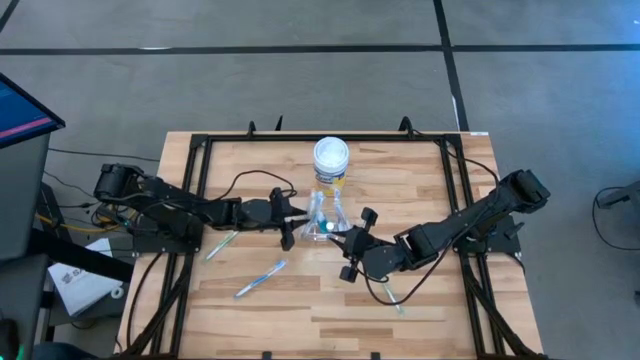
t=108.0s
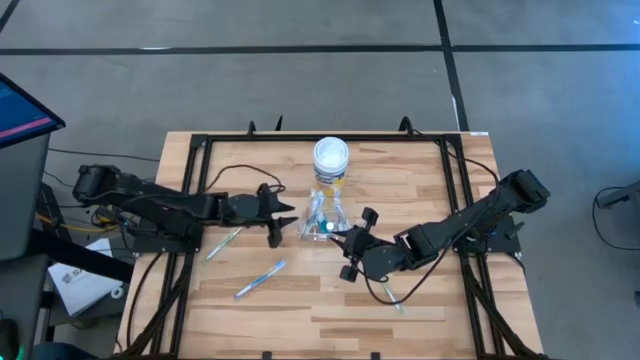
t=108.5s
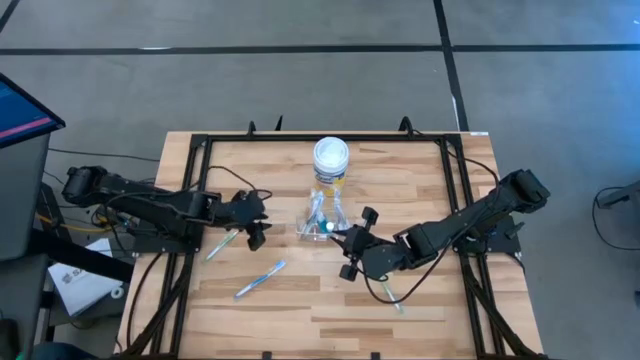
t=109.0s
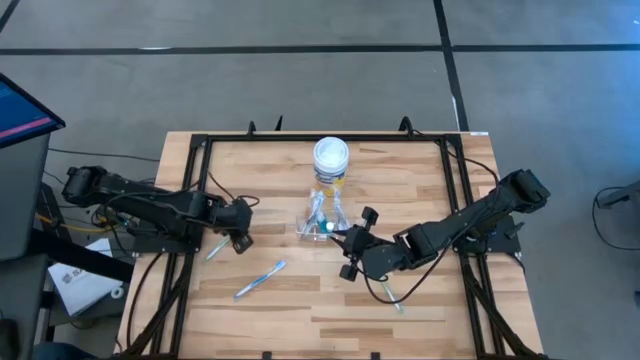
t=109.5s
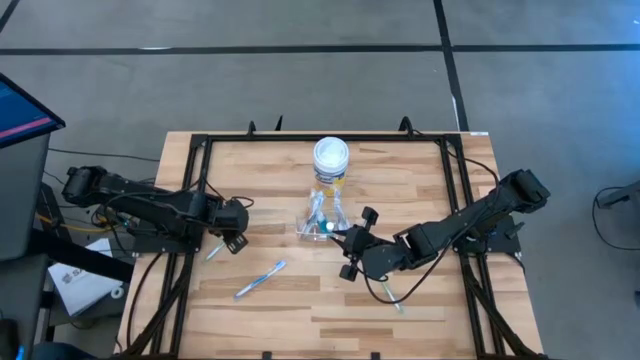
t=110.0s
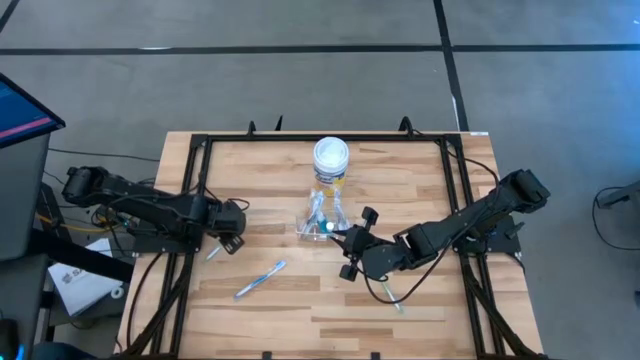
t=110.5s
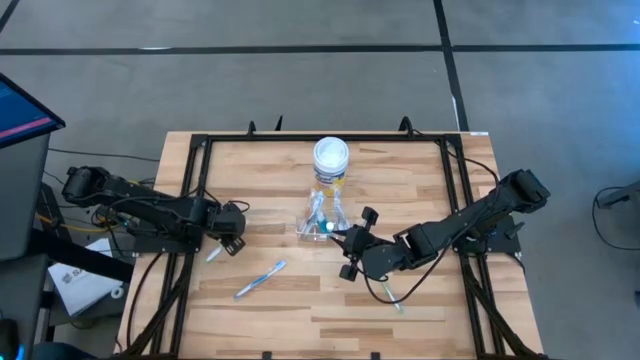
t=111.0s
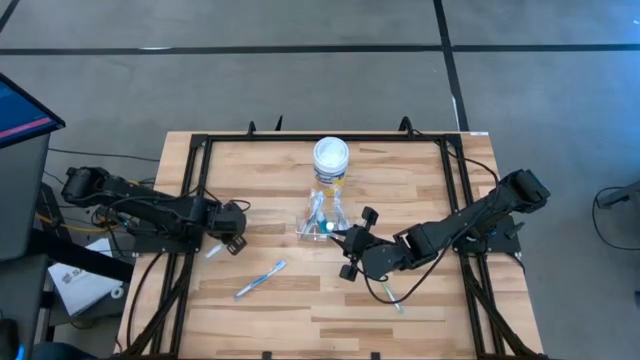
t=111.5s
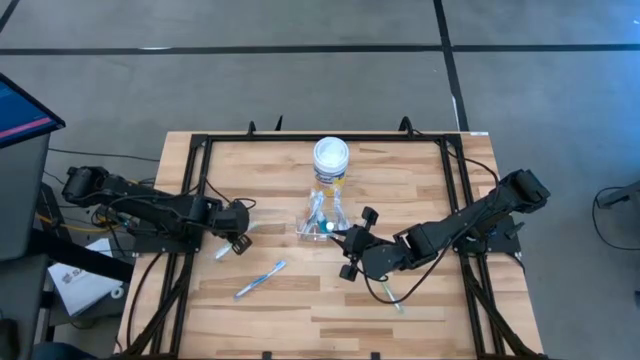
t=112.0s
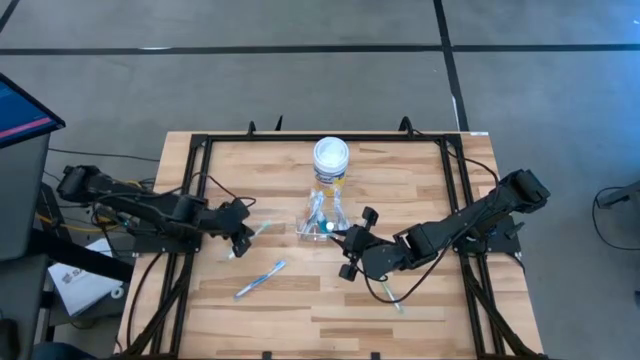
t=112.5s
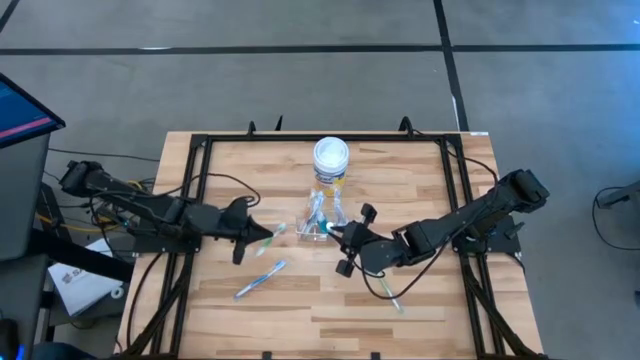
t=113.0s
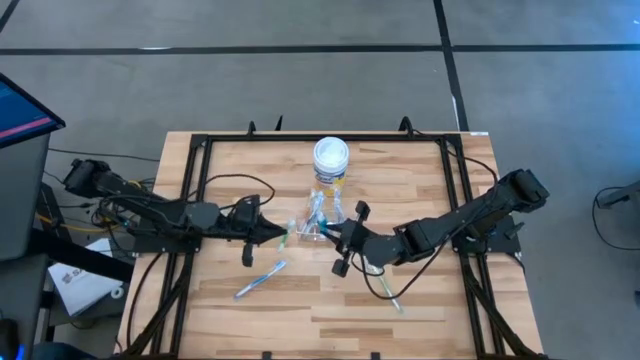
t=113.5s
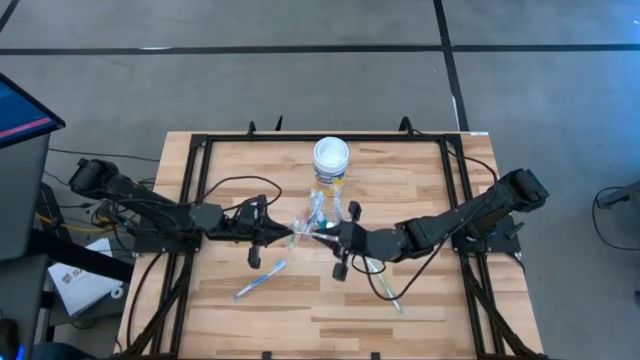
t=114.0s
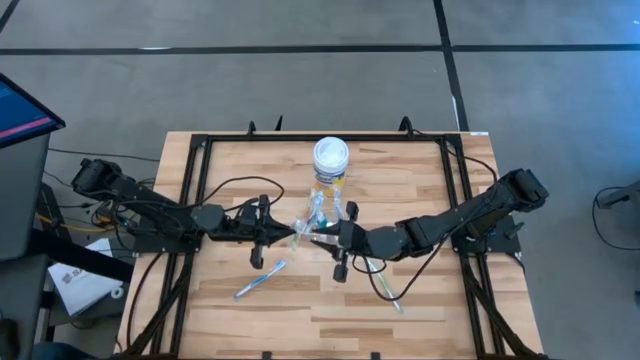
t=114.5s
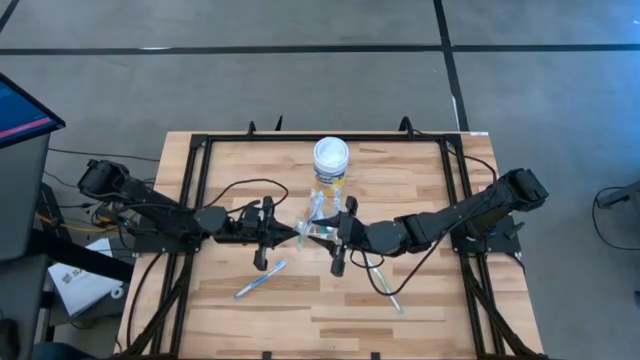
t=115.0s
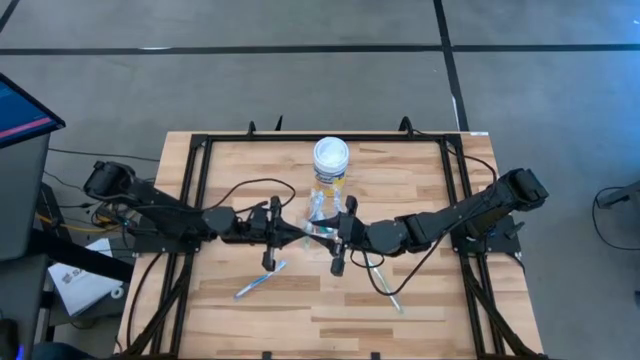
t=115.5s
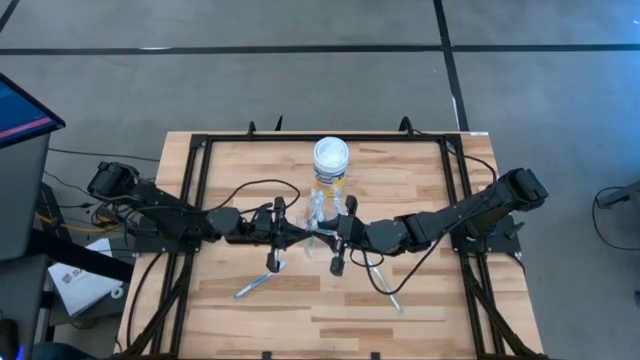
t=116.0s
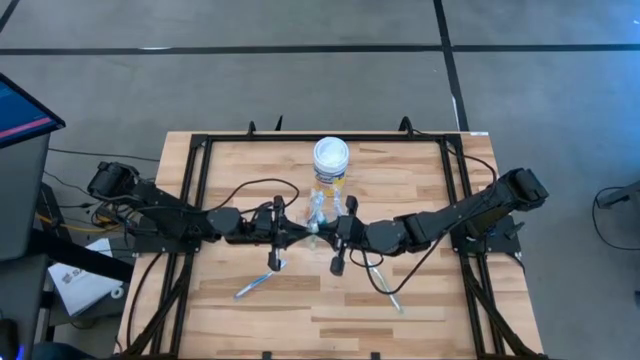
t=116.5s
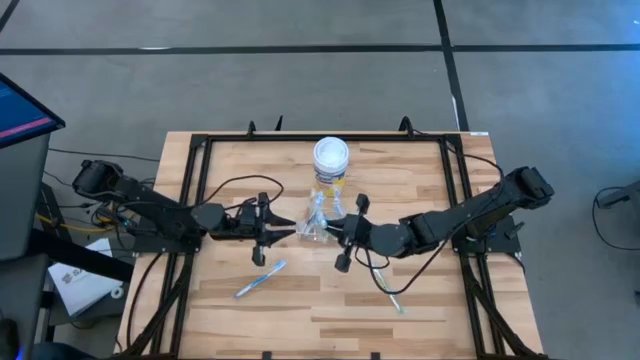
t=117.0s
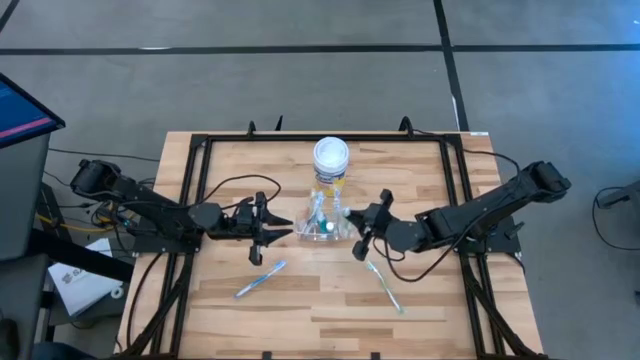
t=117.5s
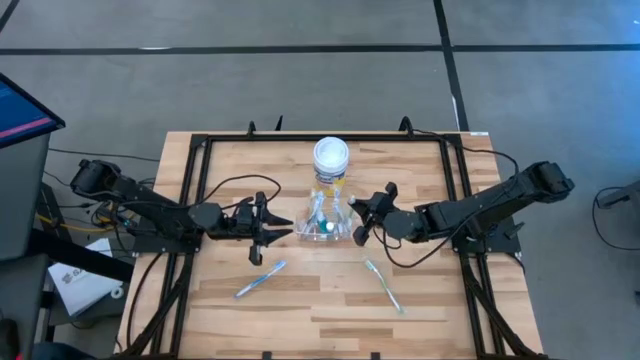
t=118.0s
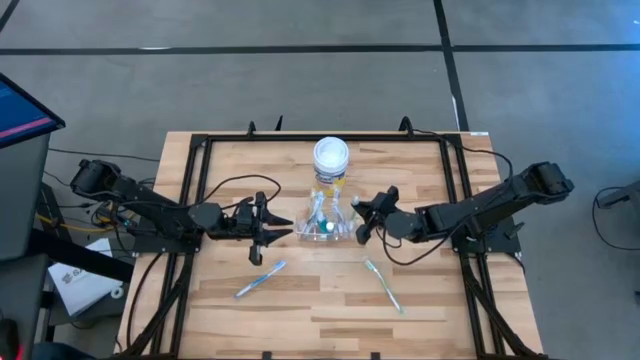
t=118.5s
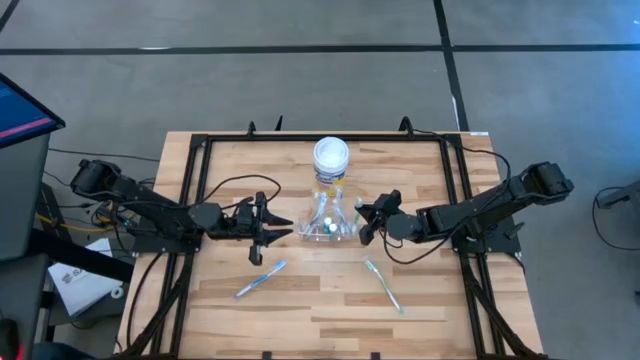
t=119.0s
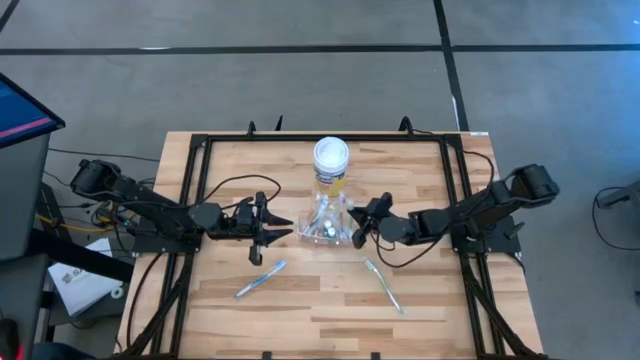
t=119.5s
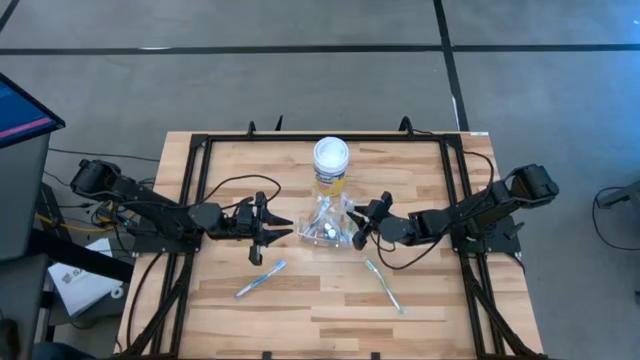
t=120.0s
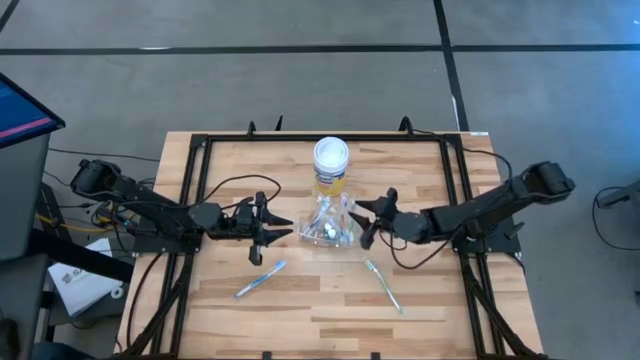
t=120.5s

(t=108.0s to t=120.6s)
Task: Pick & Place toothbrushing station
Put the left green toothbrush into the transparent organizer

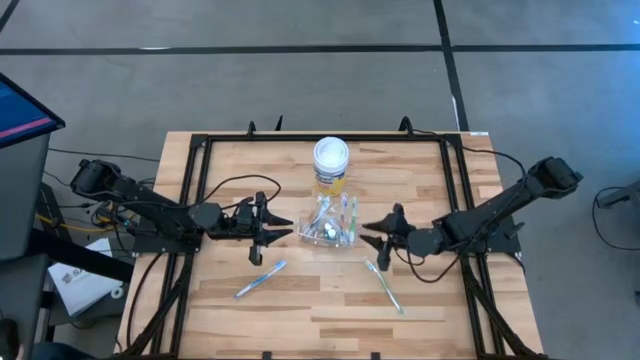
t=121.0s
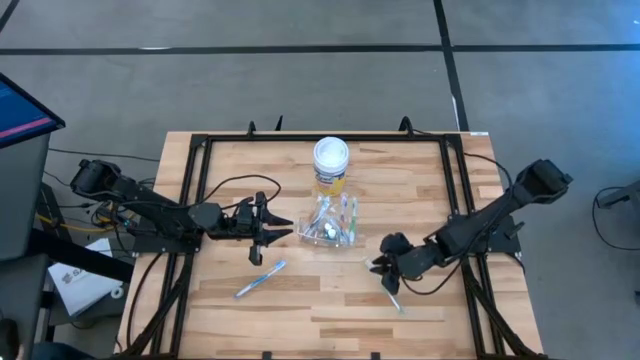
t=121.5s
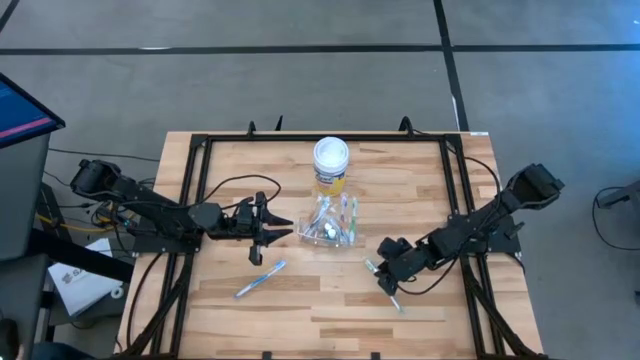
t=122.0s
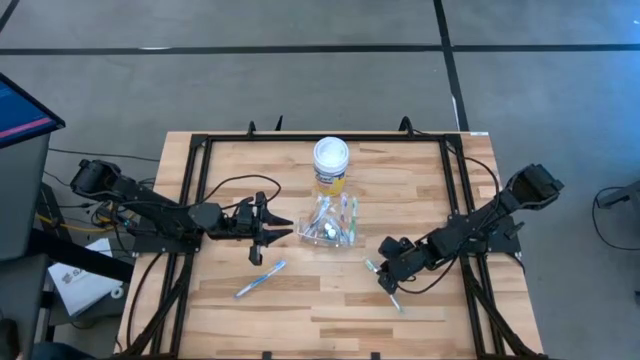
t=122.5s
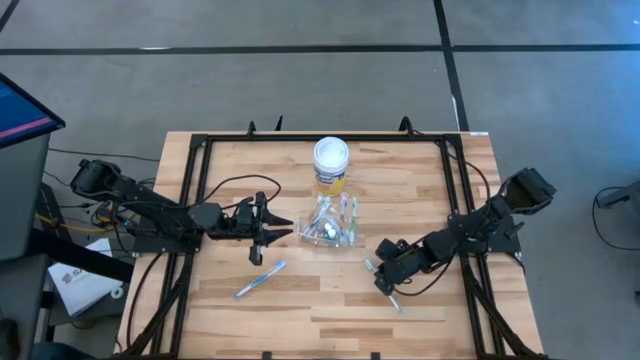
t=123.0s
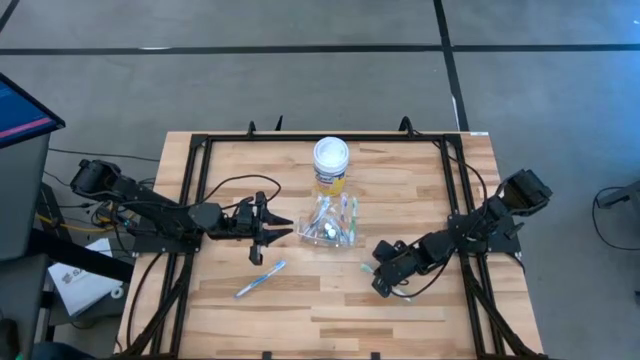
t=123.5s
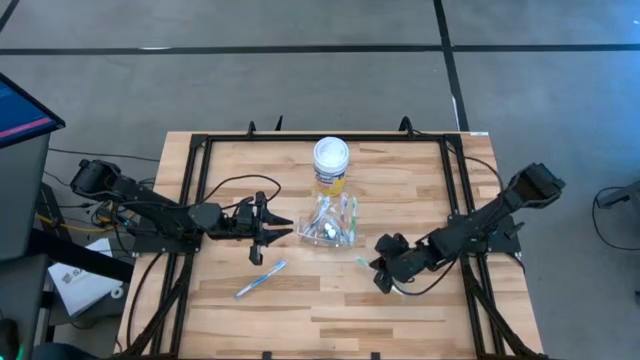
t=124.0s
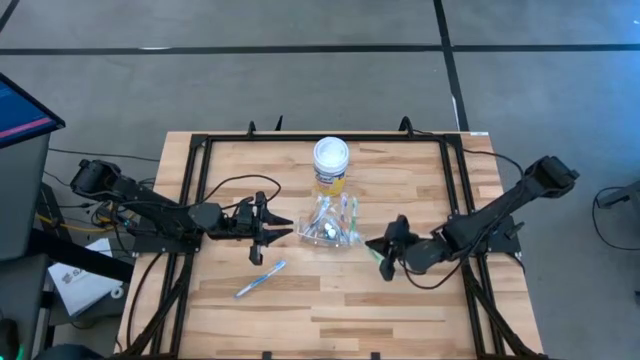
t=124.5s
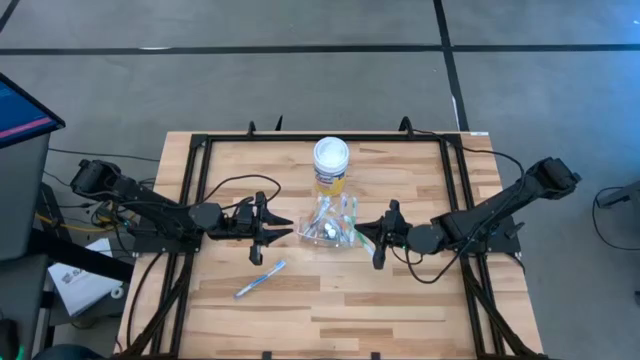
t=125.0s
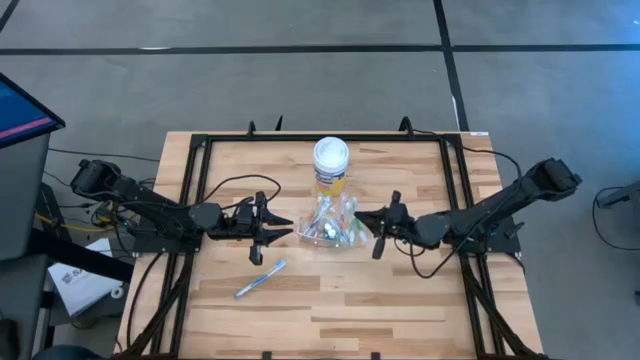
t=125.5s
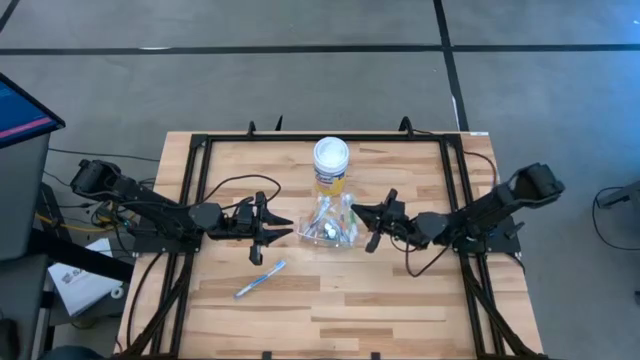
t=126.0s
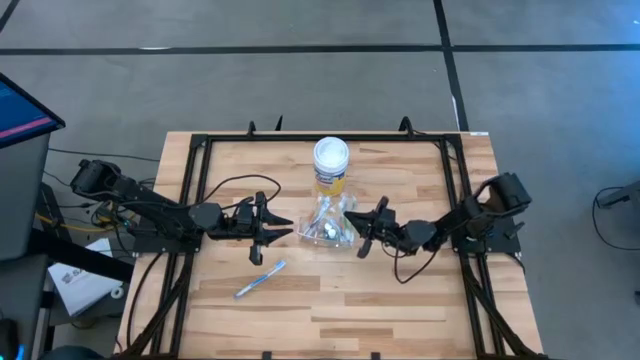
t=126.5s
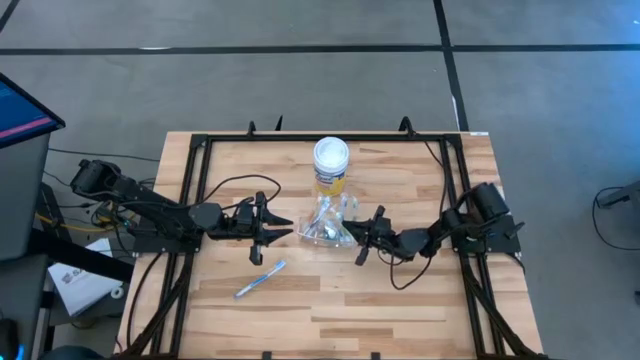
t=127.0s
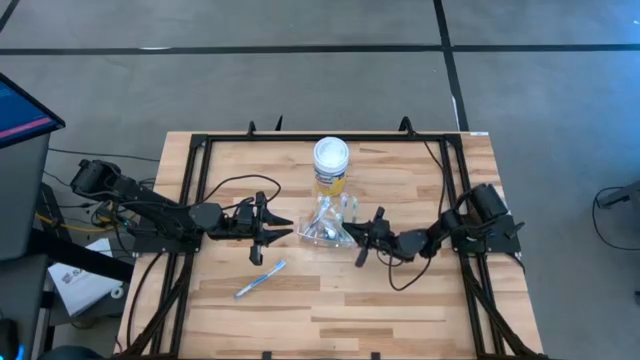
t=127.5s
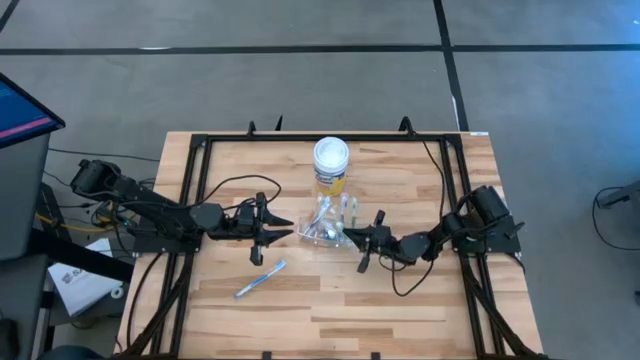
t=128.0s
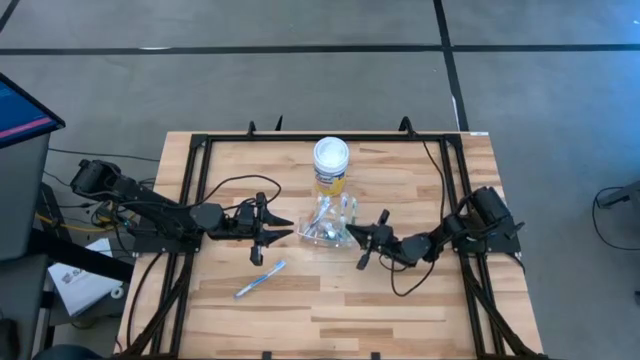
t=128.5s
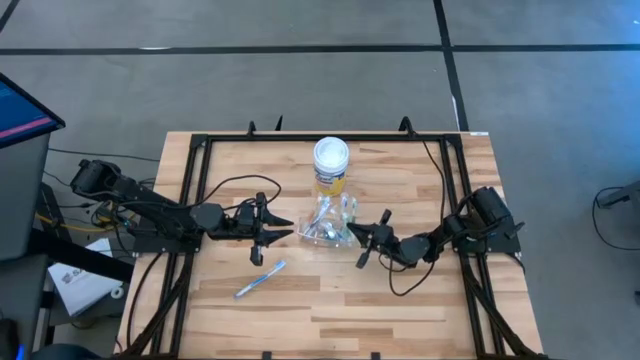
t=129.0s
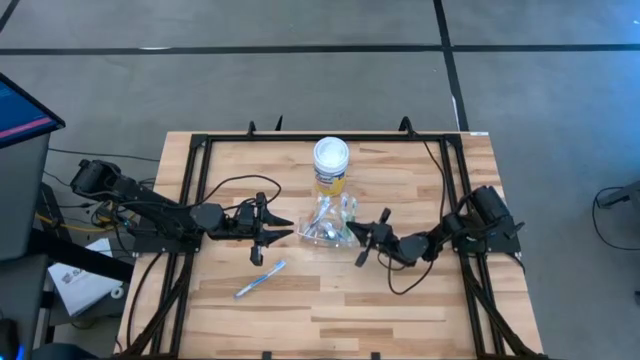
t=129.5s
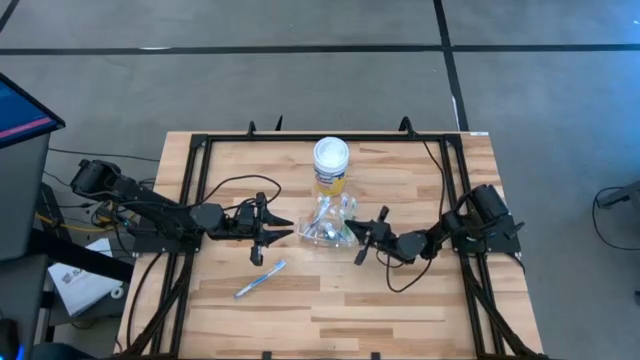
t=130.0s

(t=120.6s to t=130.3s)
Put the green toothbrush into the transparent organizer
